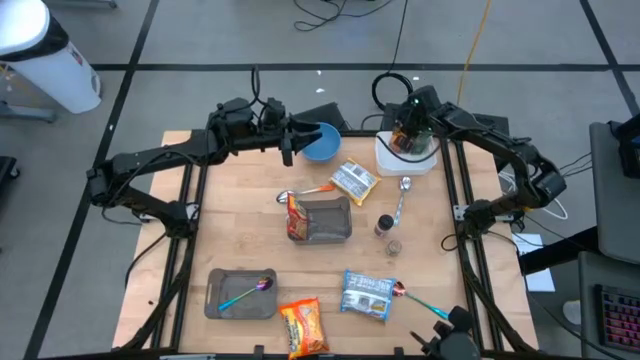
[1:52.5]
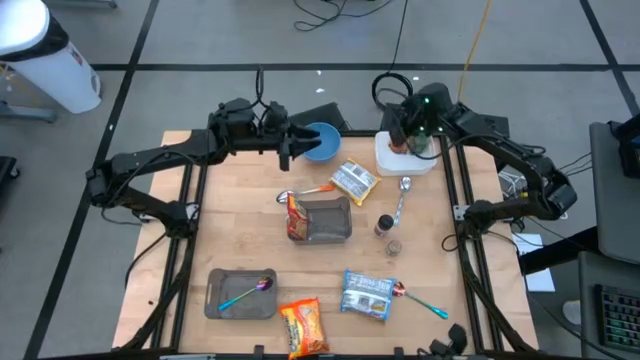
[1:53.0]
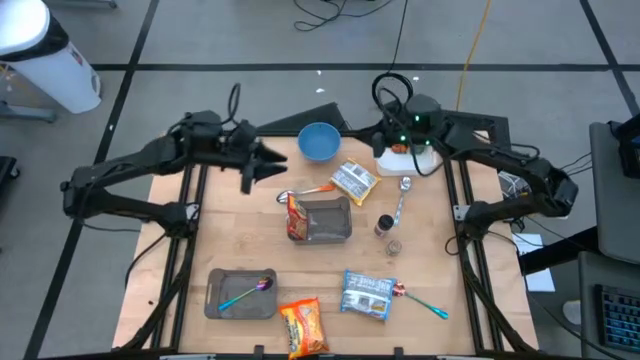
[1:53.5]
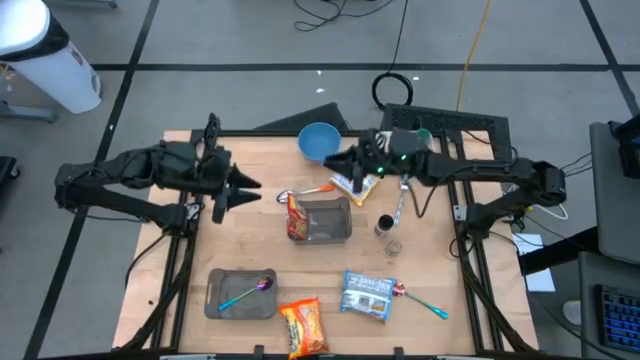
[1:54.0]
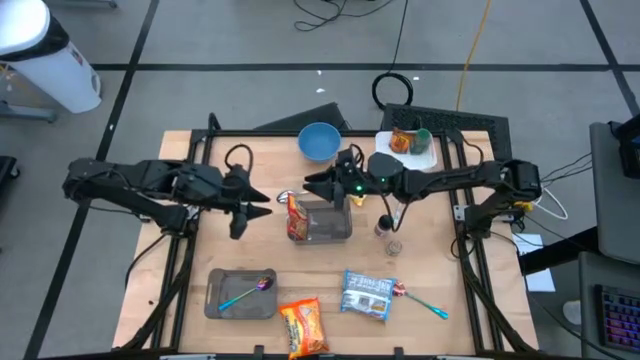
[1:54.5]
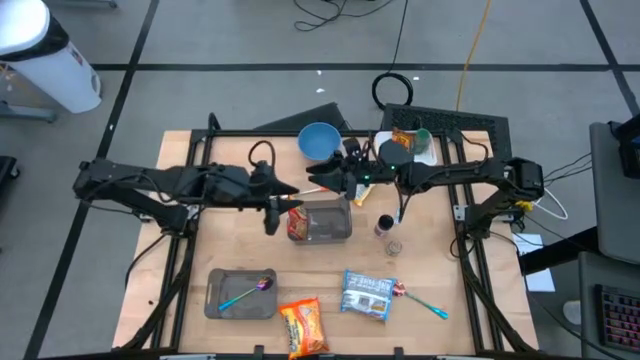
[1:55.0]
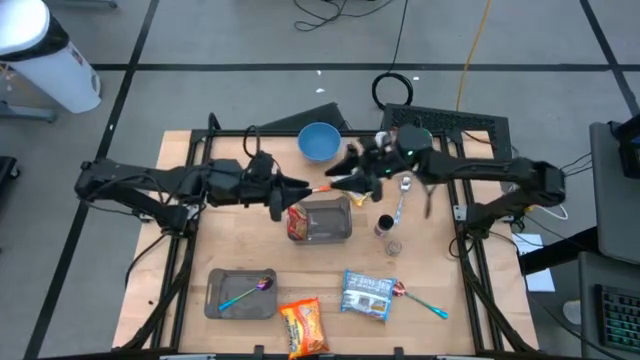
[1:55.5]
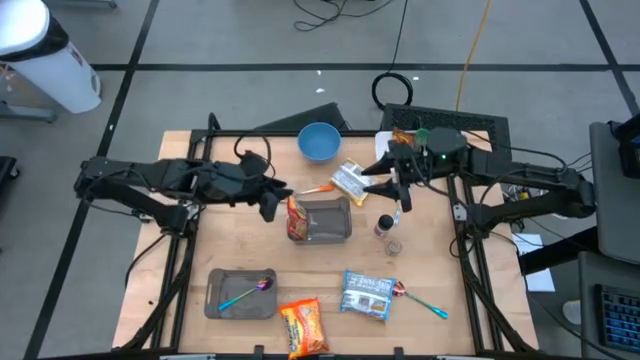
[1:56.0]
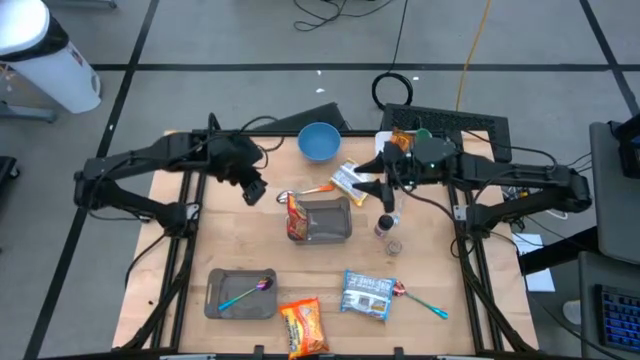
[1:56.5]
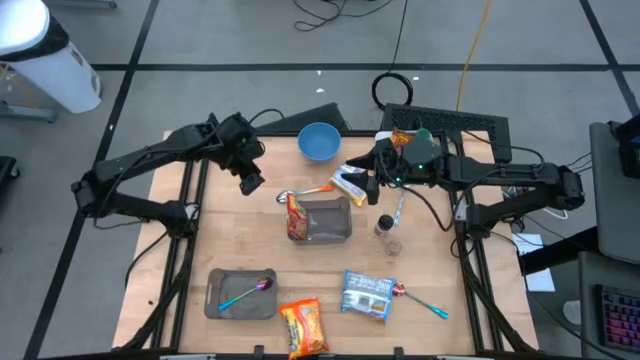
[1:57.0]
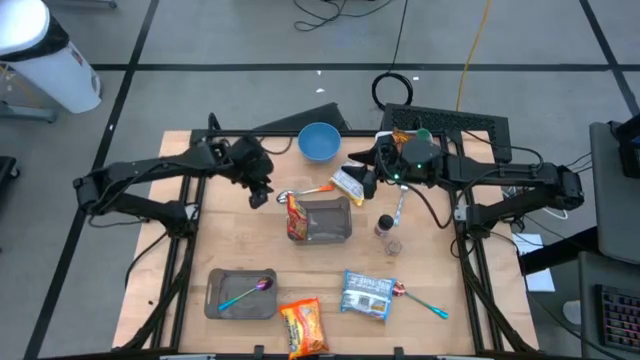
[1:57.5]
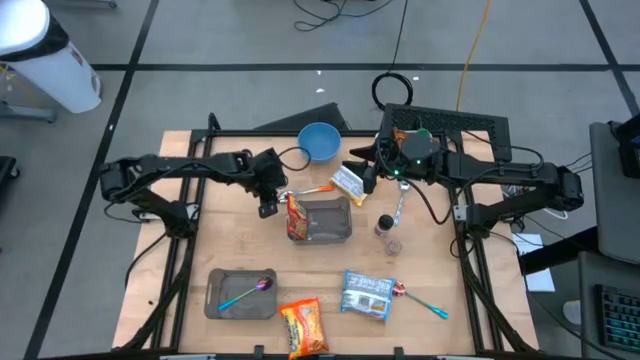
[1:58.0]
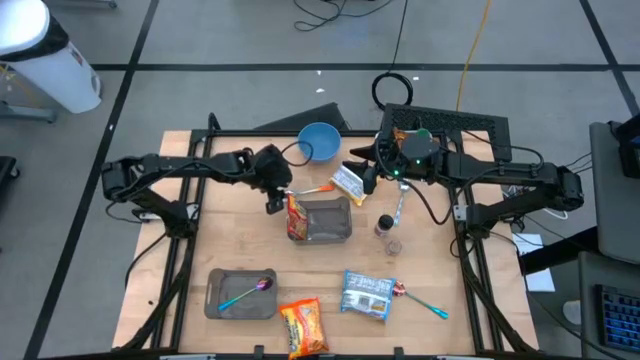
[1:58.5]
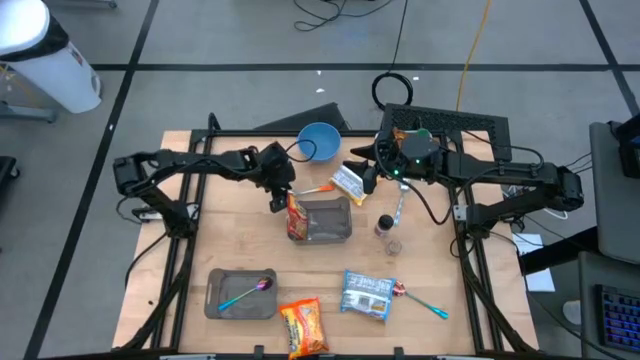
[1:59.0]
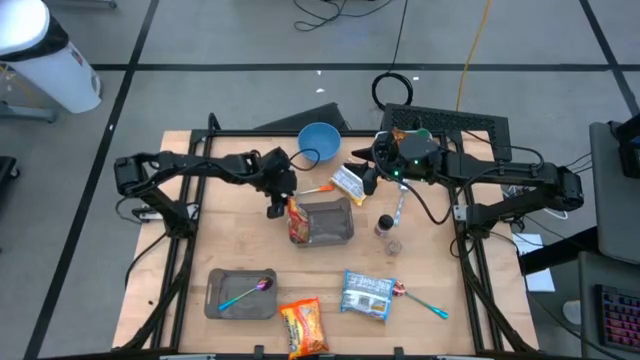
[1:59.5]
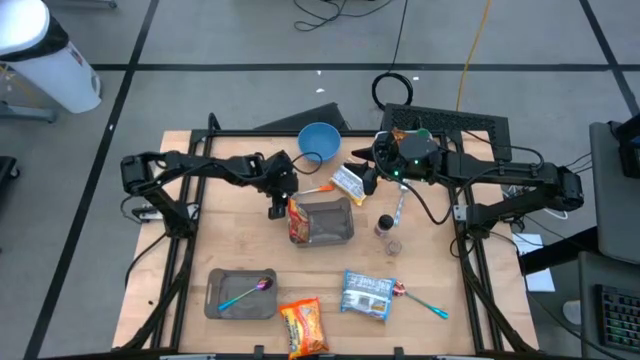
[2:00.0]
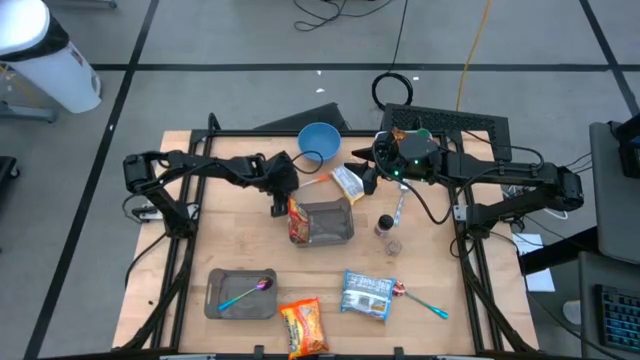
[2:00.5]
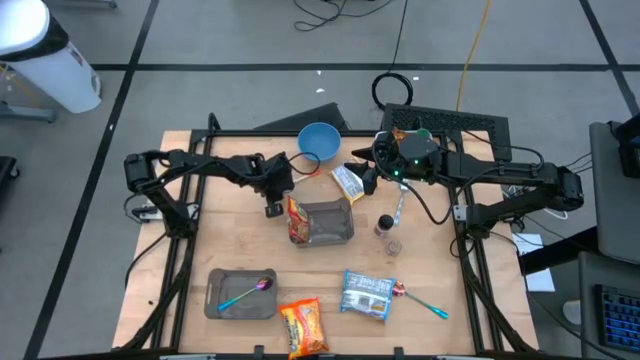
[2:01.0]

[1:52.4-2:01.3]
Task: Pick & Place Food Item
Put the orange spoon into the bottom black bin

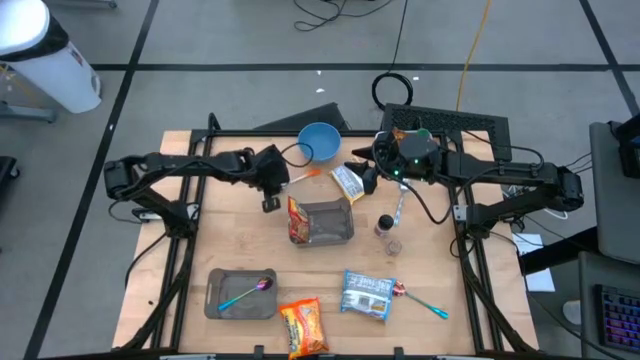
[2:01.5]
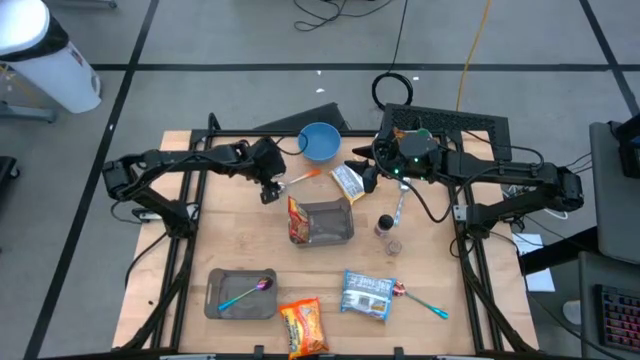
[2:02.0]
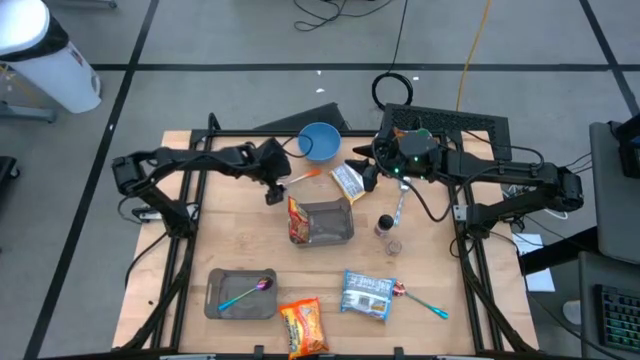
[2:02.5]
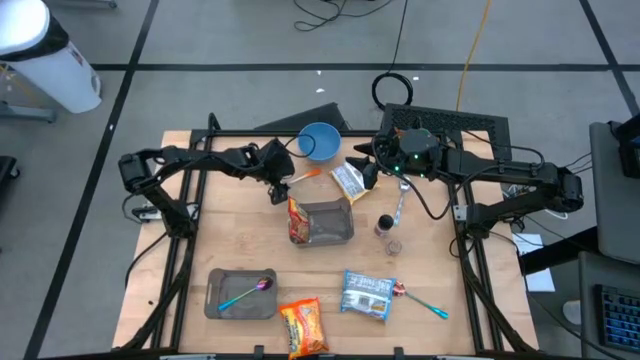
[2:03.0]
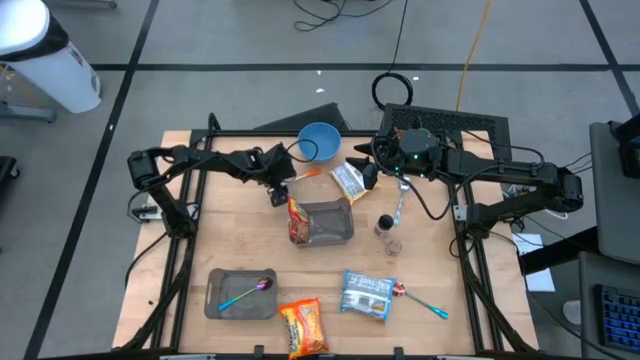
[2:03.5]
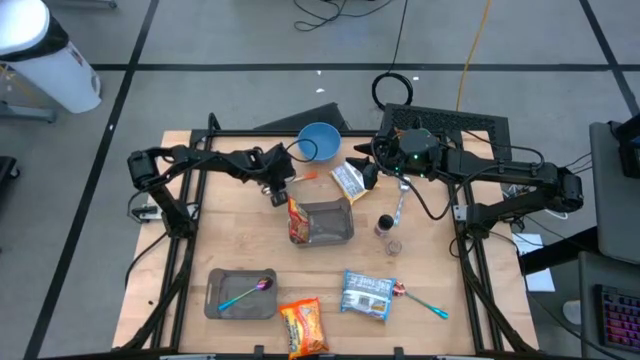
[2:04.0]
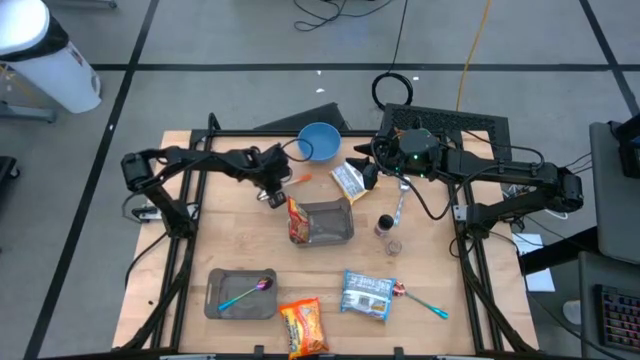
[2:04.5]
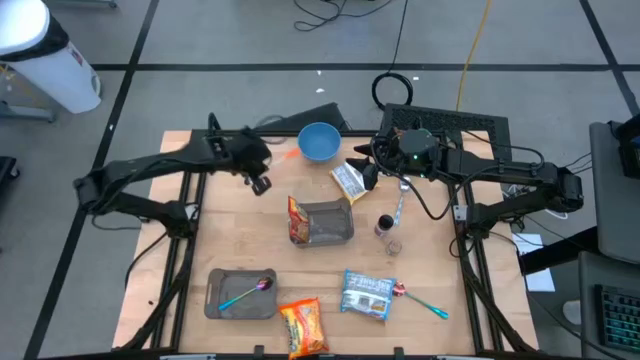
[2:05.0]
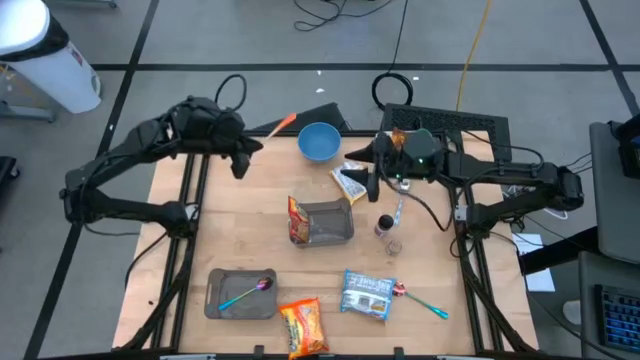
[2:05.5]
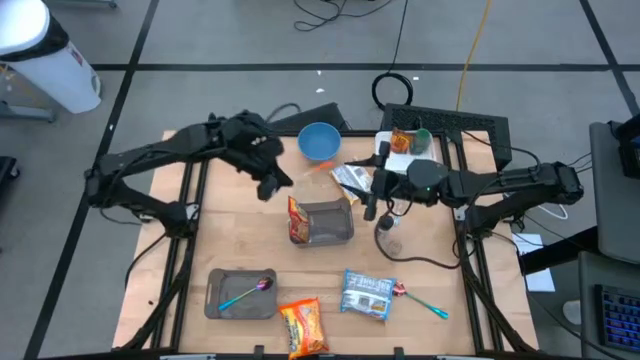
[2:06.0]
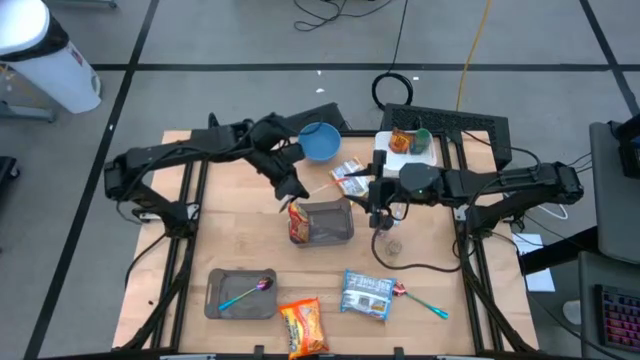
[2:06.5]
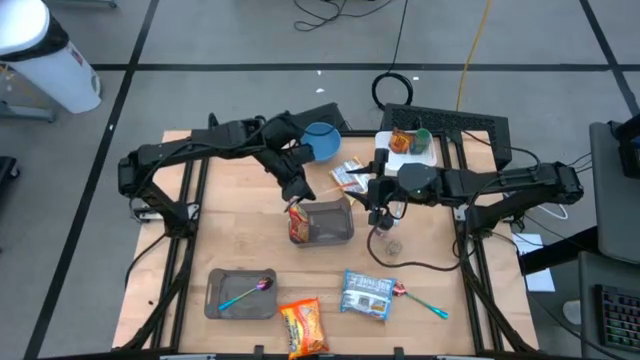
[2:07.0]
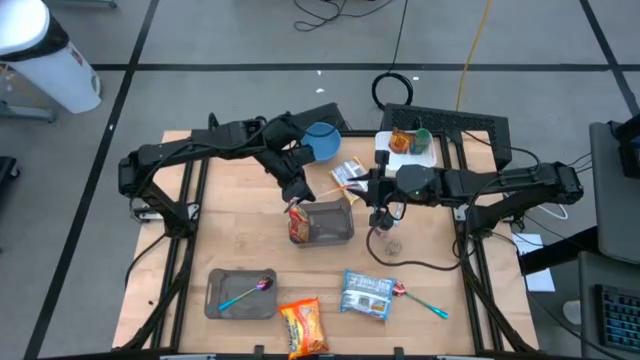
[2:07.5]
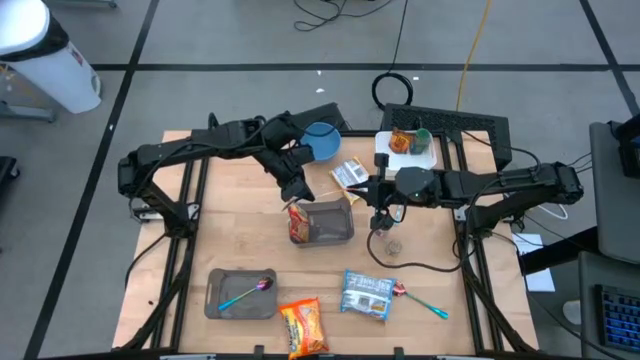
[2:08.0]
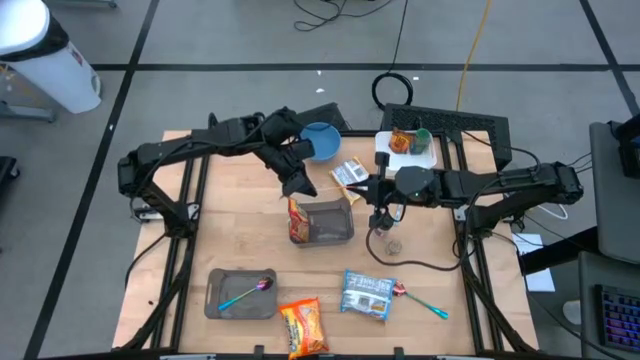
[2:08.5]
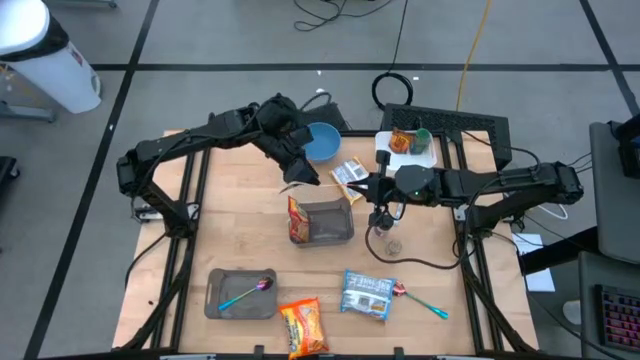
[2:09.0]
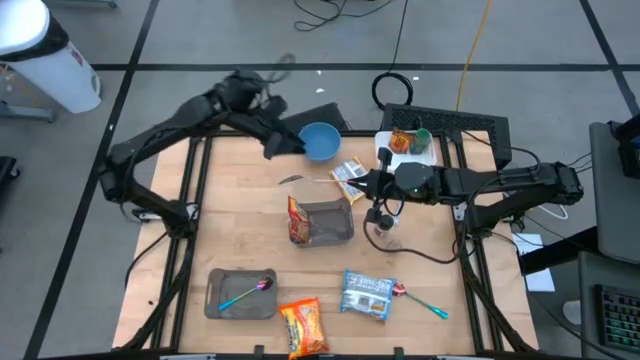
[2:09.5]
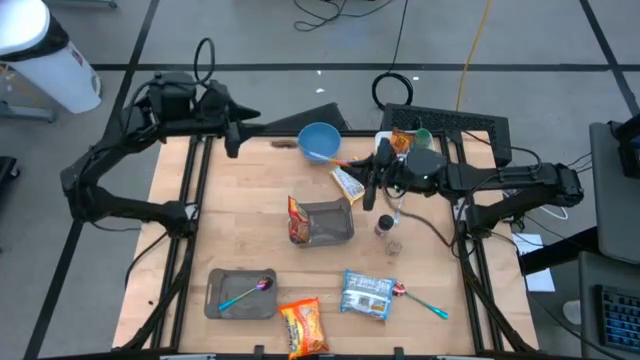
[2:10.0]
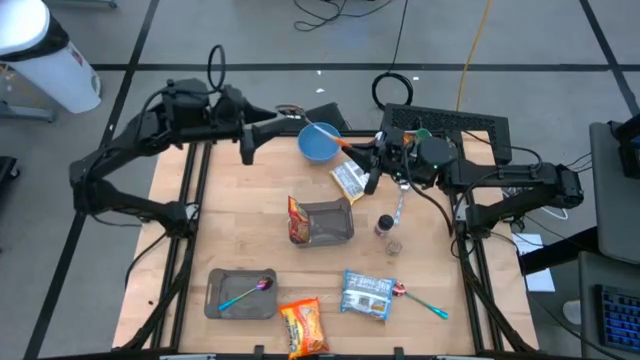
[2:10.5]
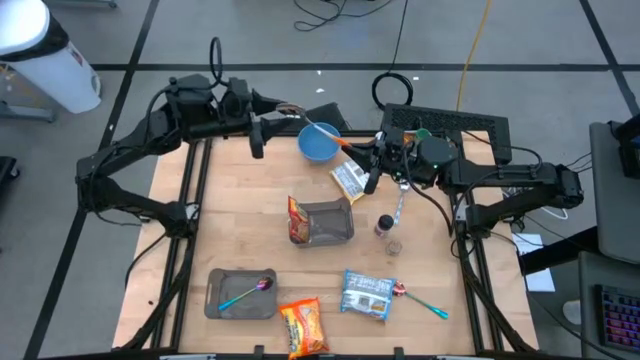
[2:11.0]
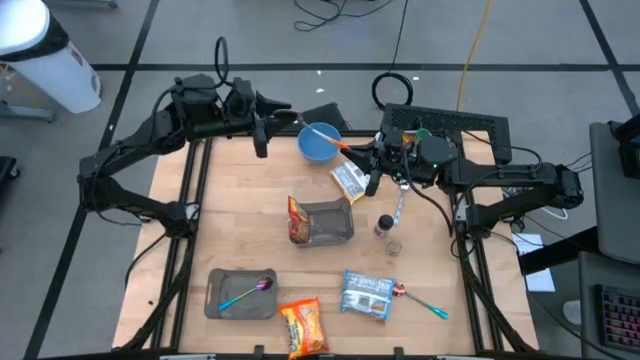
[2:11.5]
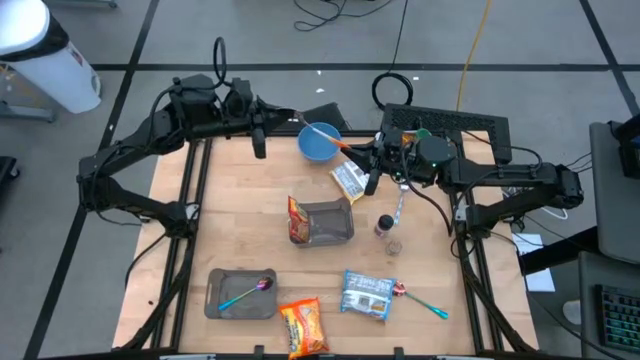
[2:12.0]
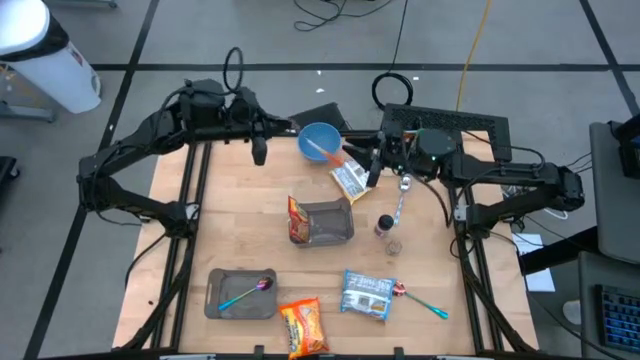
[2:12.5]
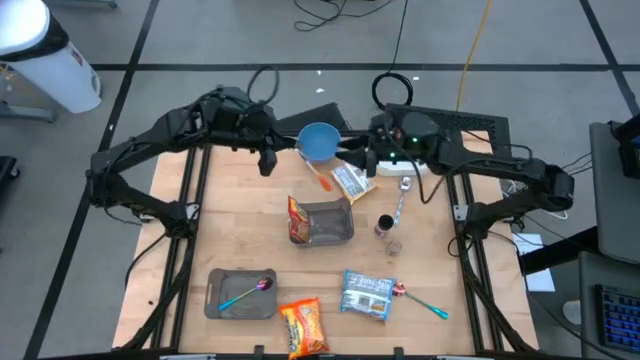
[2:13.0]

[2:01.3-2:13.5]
Put the orange spoon into the bottom black bin
